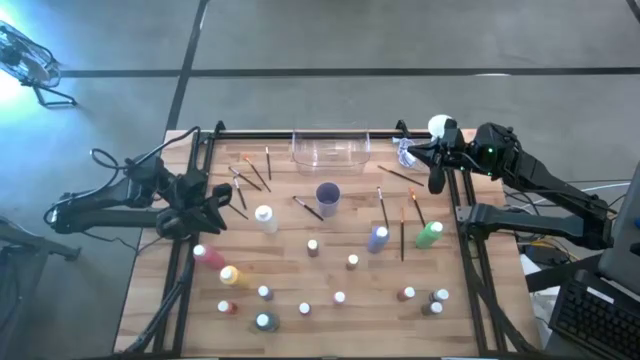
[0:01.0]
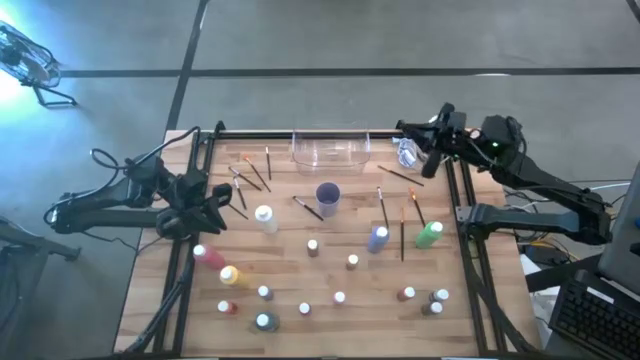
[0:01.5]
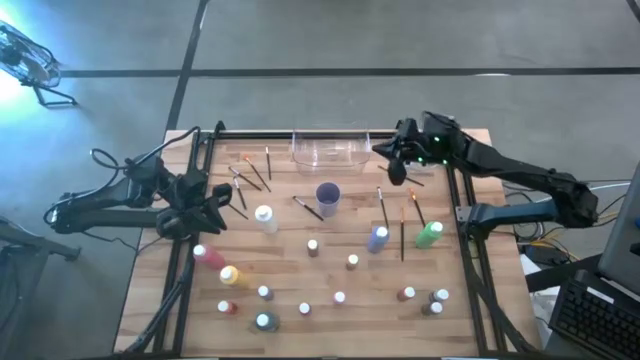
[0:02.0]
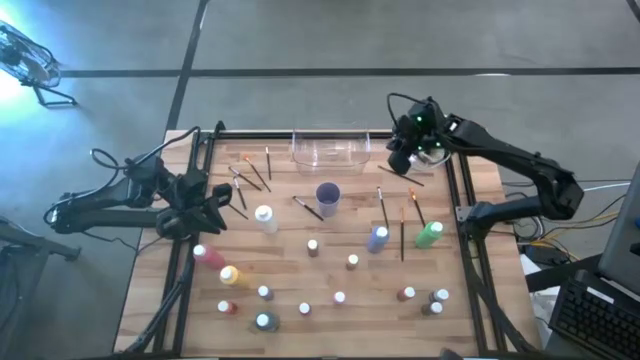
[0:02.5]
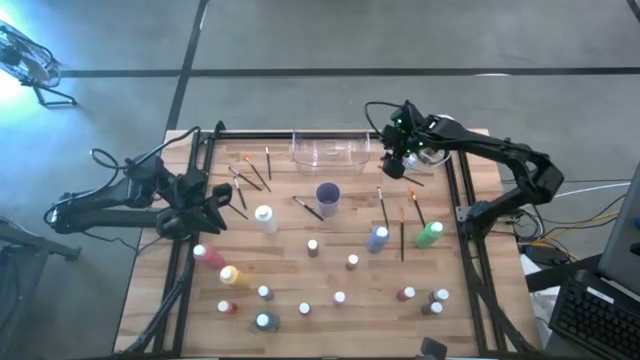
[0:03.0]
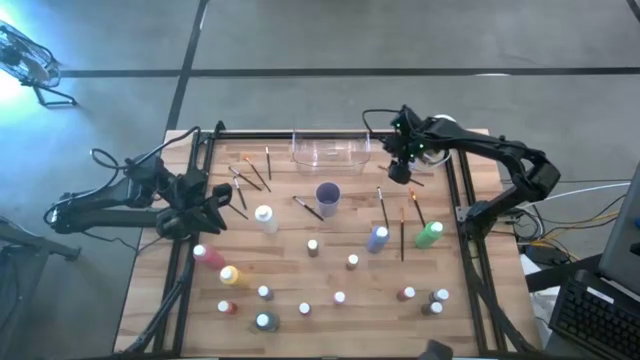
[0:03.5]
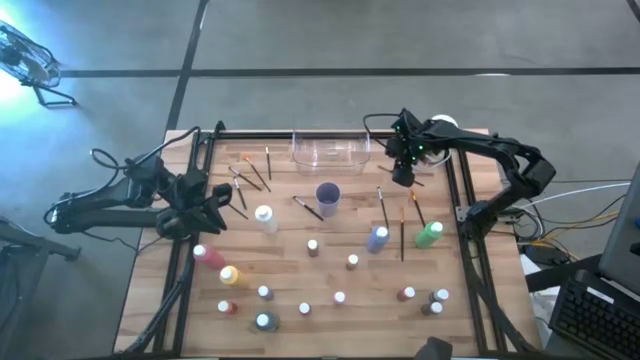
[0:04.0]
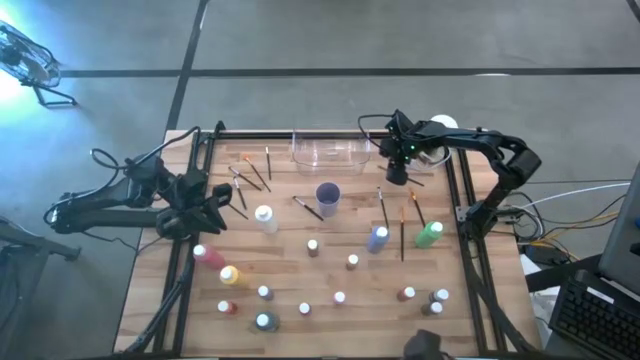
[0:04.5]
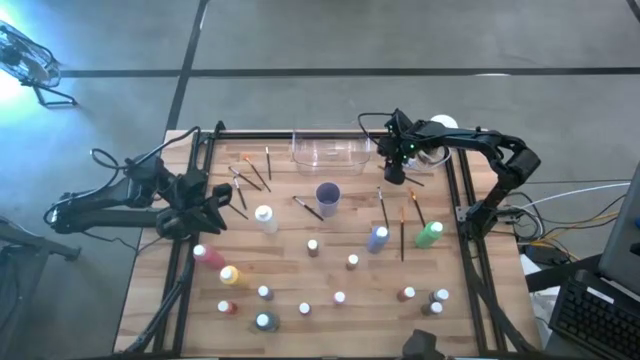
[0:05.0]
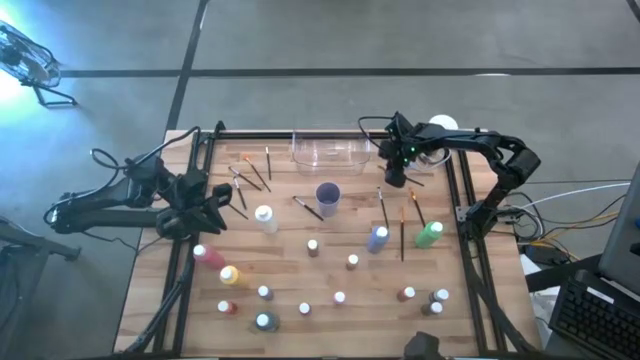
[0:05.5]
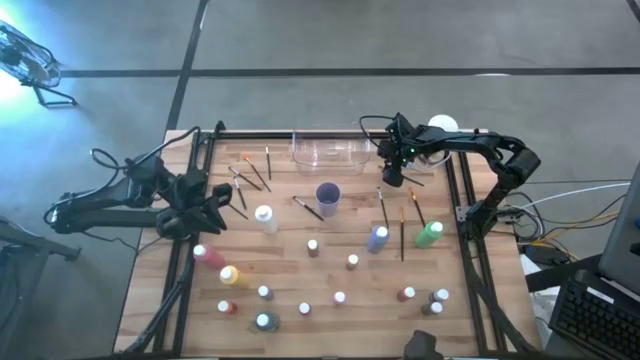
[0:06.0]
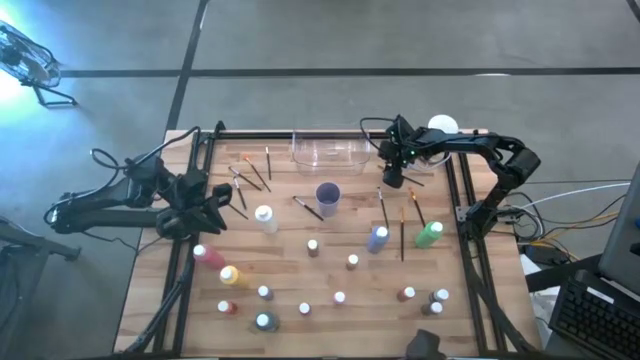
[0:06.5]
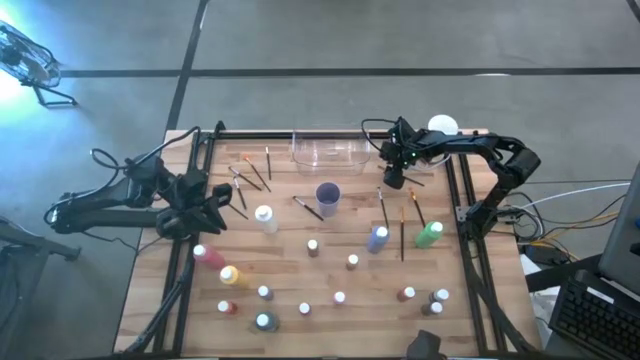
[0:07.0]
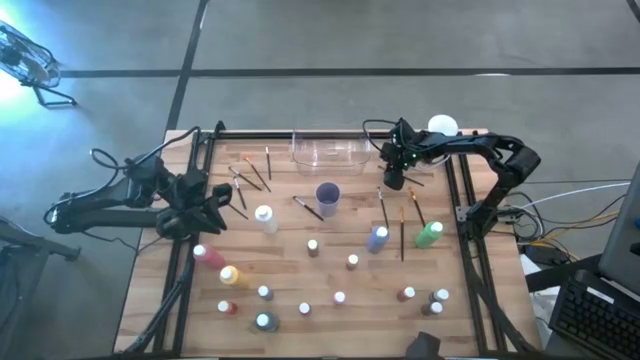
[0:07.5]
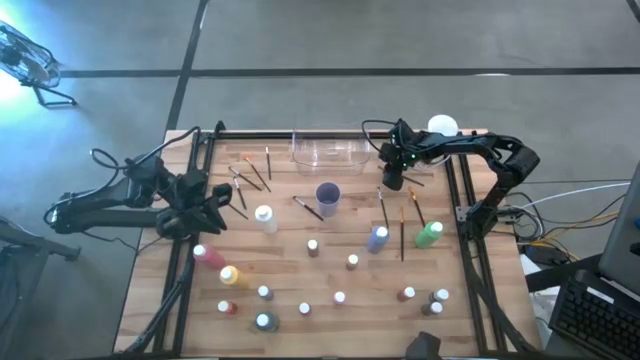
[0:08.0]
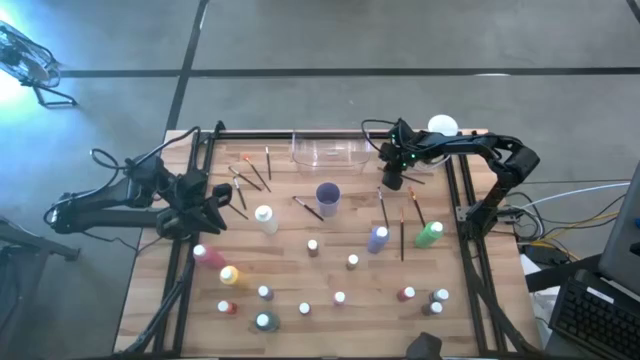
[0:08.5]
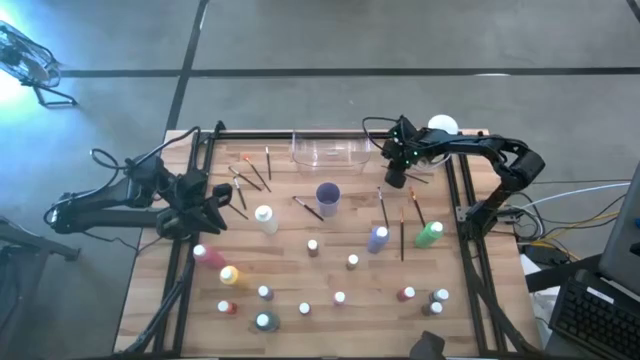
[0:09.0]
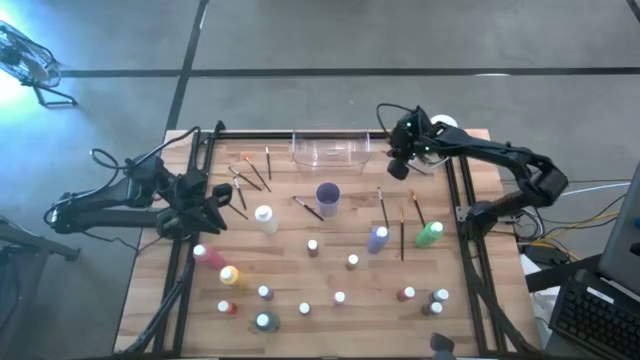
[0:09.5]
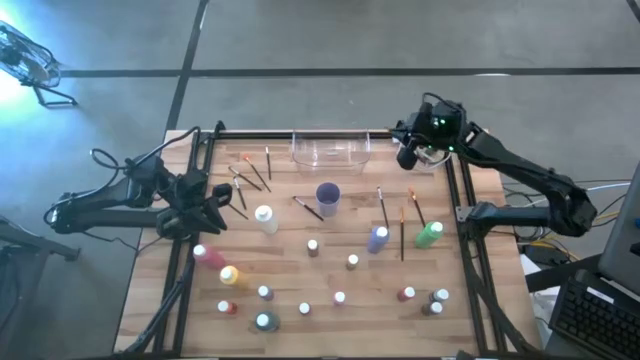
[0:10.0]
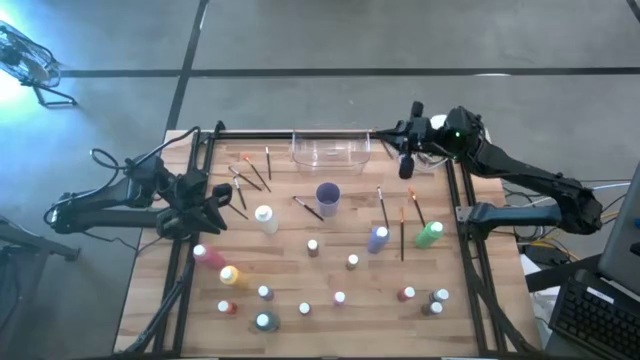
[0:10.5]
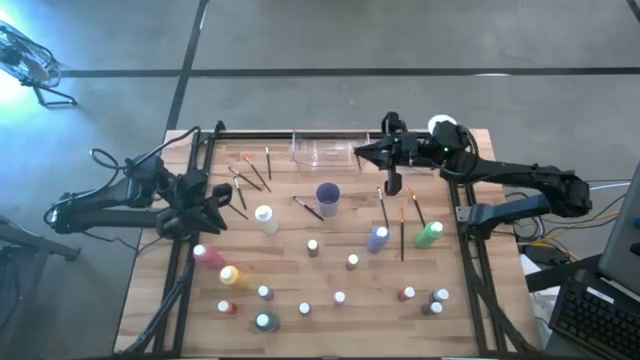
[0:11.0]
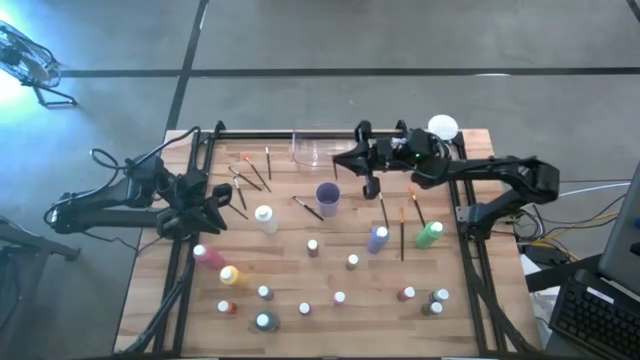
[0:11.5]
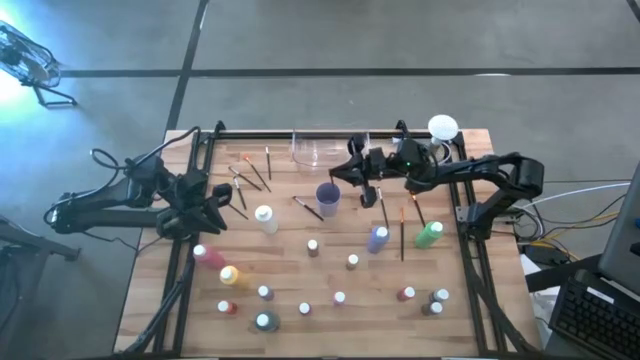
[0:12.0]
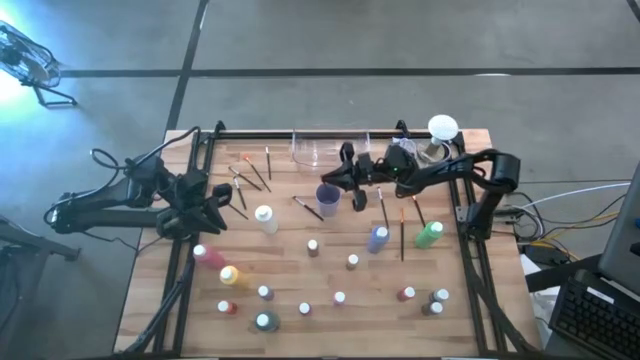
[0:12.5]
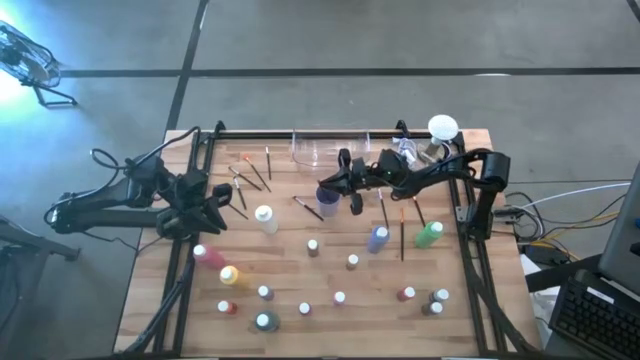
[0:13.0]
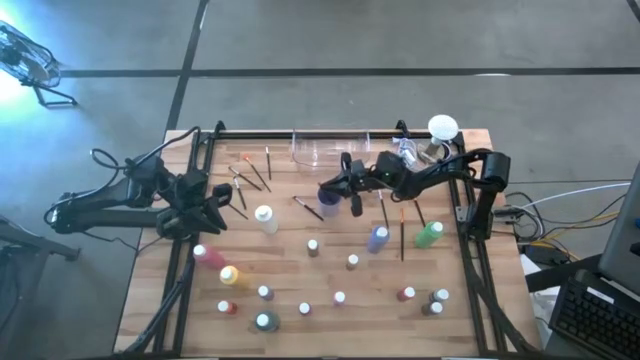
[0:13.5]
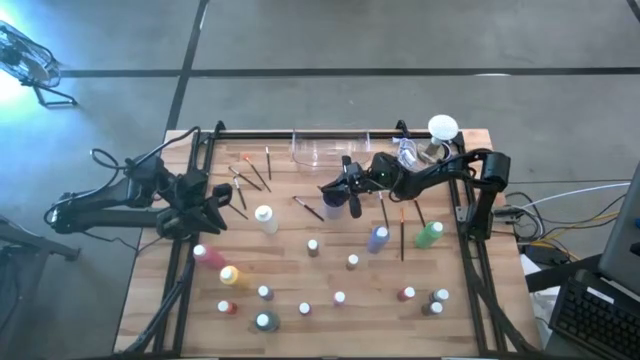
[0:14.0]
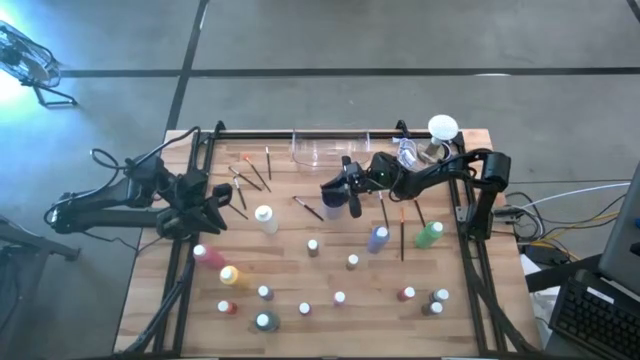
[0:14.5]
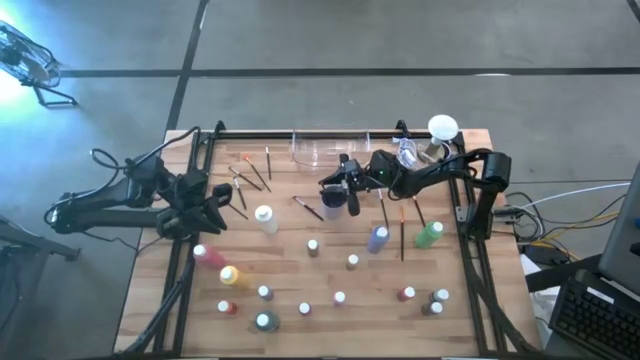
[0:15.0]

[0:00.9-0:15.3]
Task: Pick & Place Paint Supplies
Put the gold paint brush into the purple cup

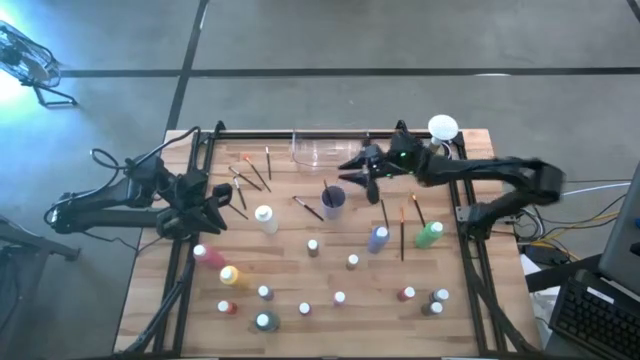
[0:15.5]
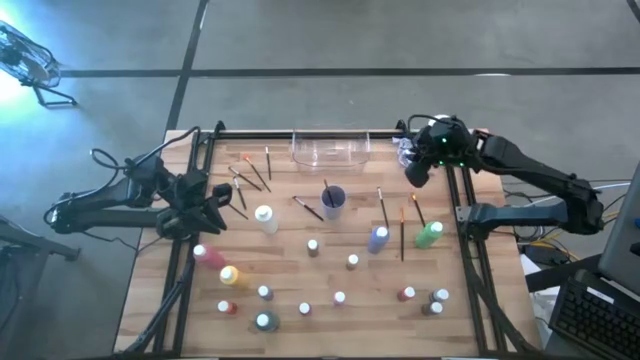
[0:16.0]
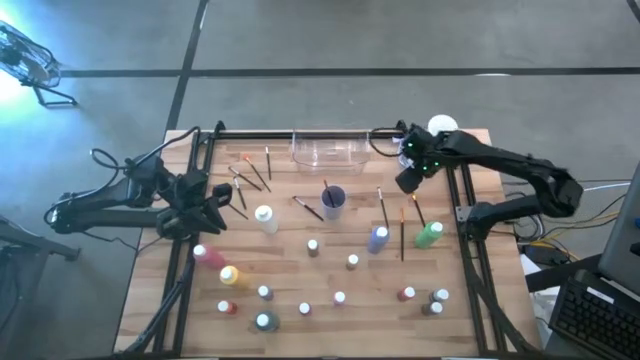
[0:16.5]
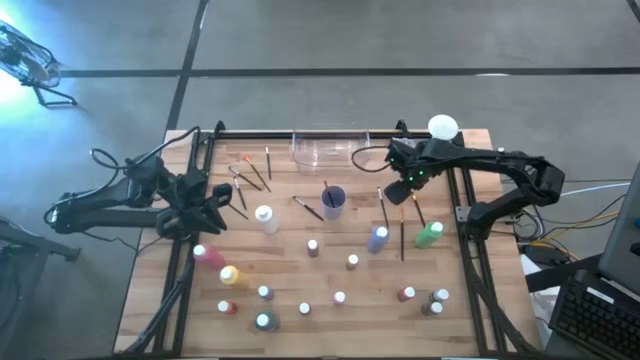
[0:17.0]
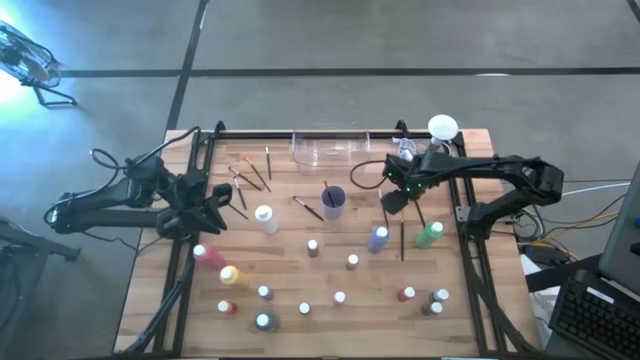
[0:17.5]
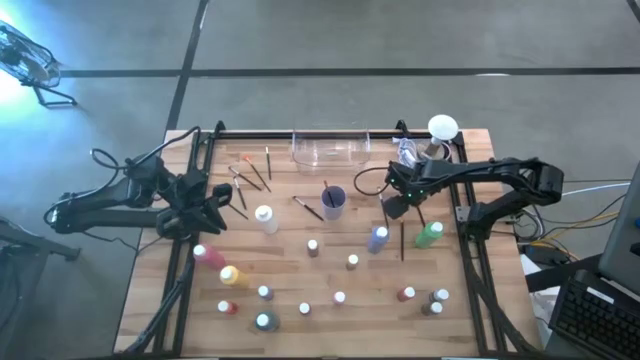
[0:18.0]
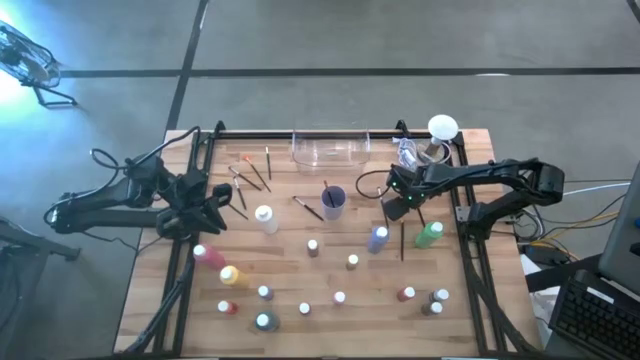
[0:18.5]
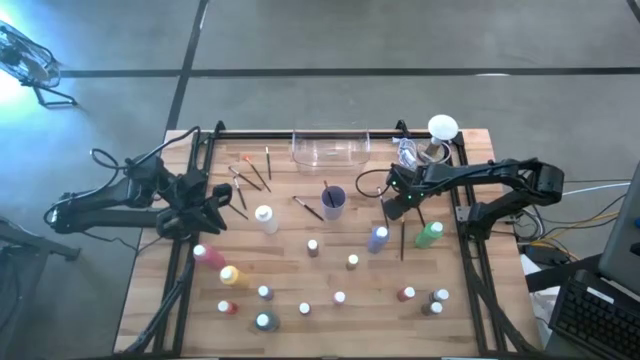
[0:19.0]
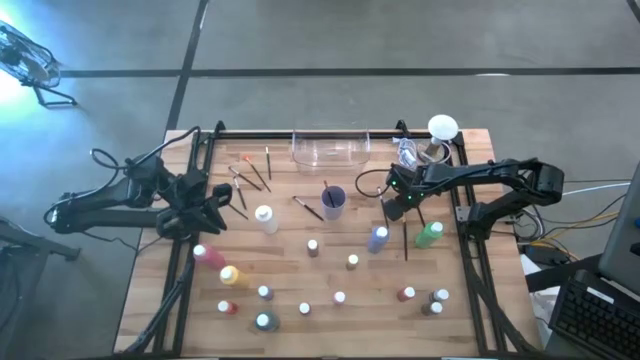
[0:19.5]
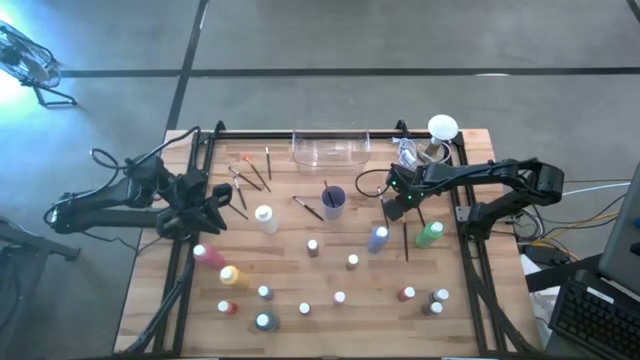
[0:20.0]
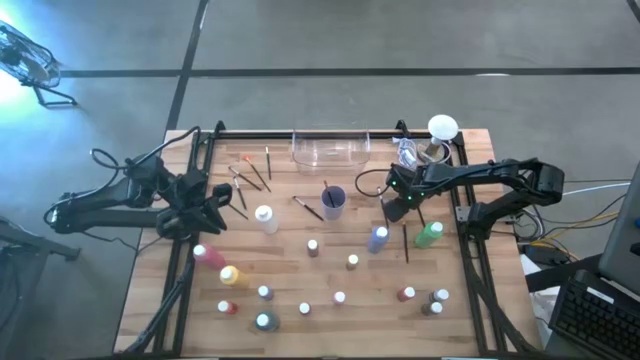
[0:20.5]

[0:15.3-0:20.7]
Put the gold paint brush into the purple cup
